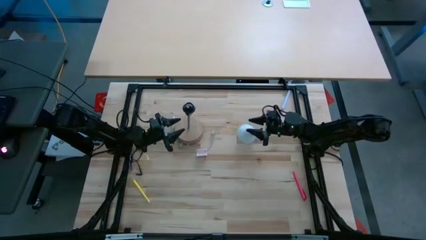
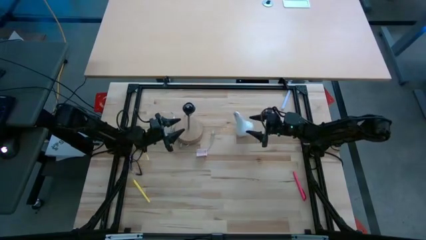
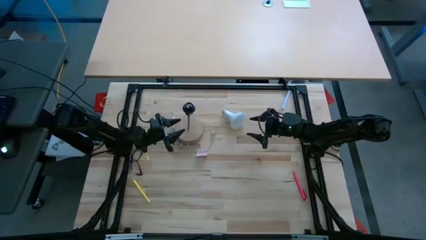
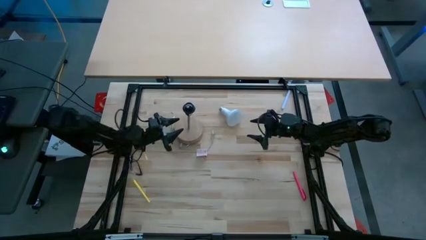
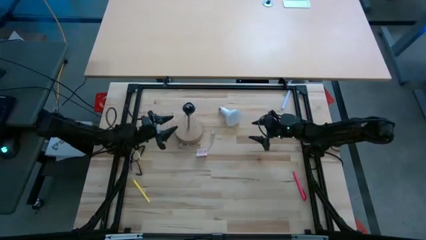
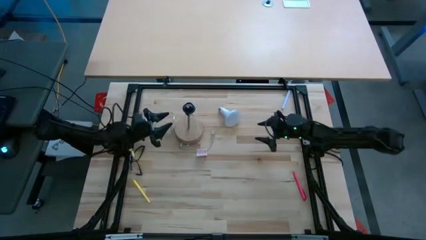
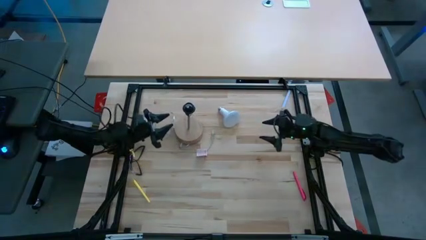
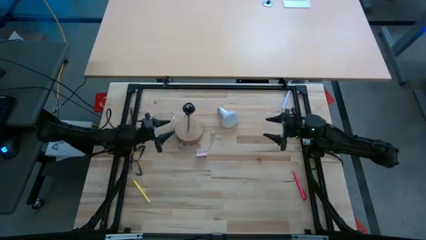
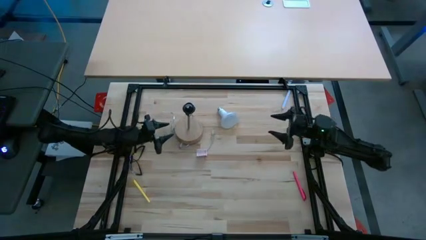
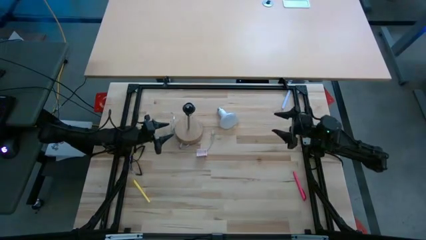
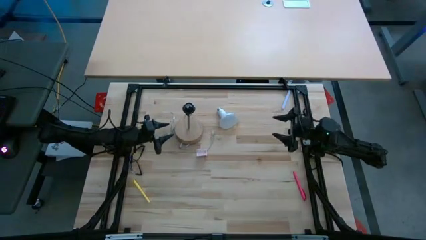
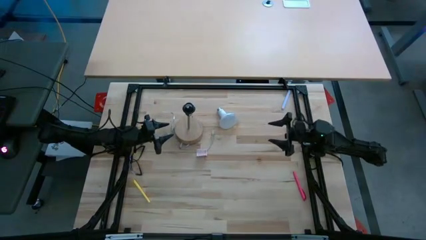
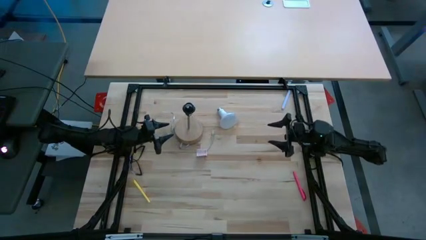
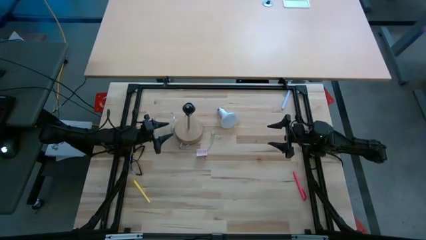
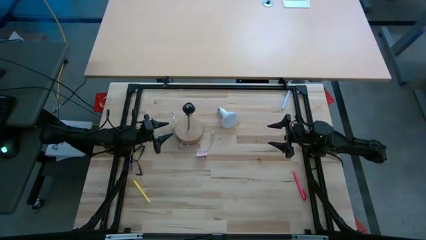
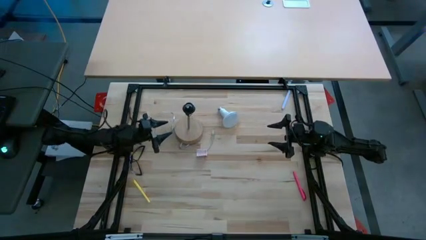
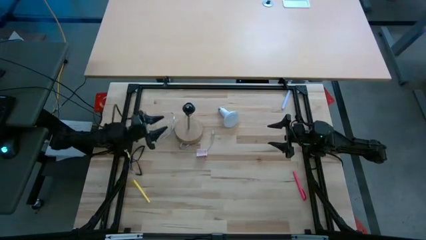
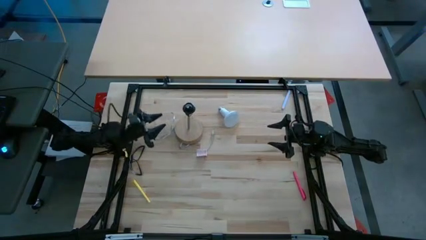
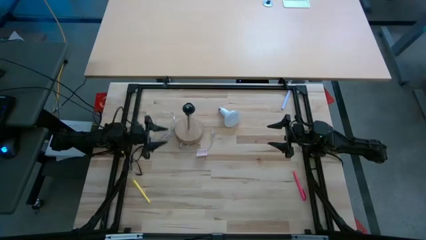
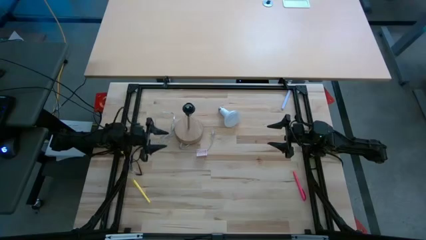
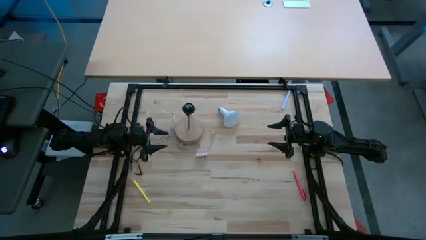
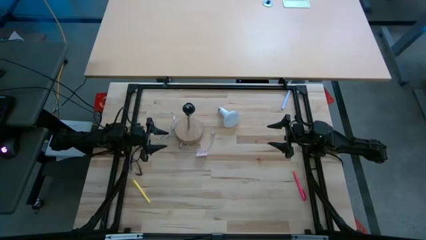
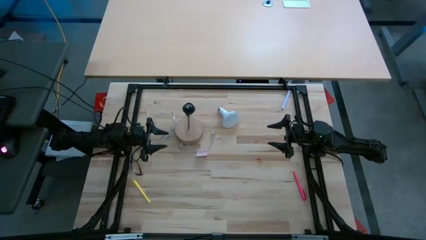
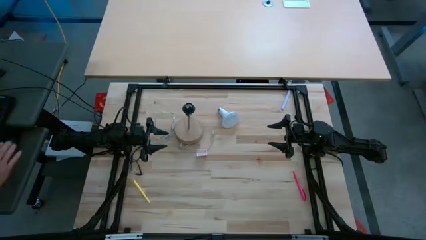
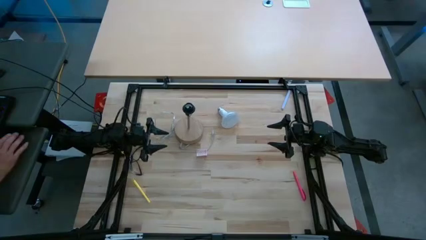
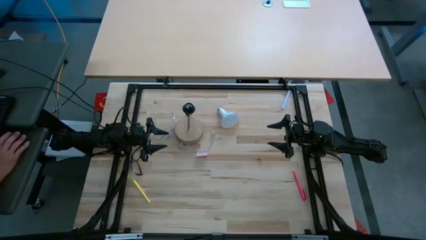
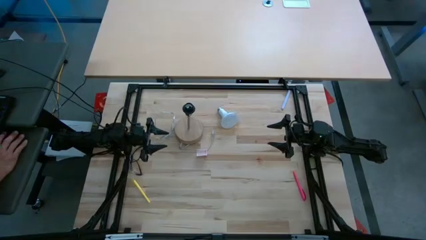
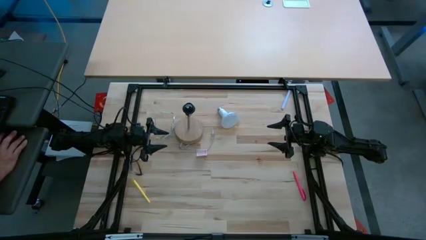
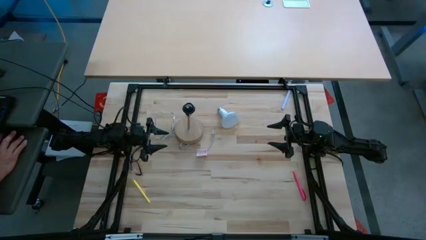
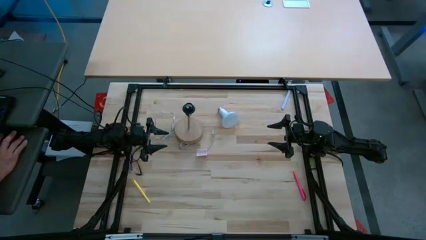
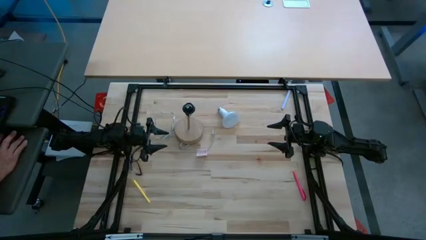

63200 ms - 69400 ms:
Task: Screw lightbulb
Return to Home Position

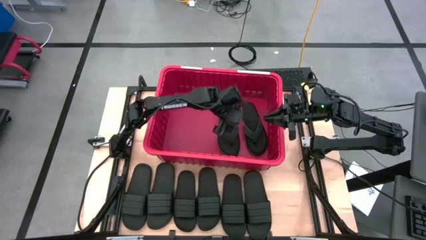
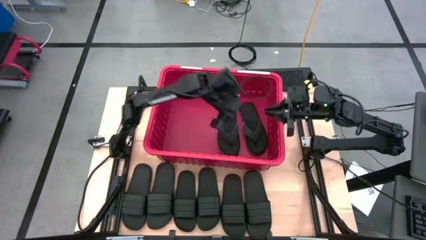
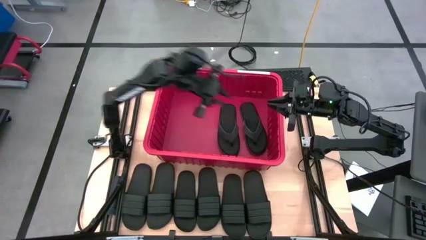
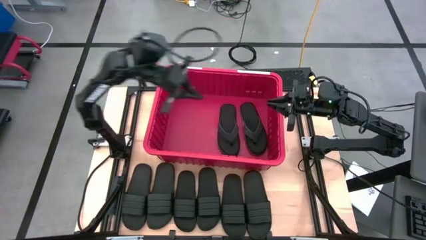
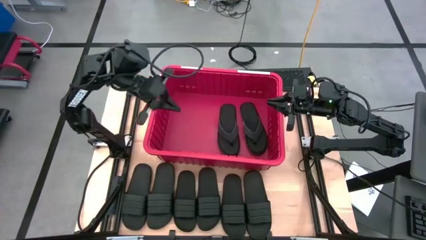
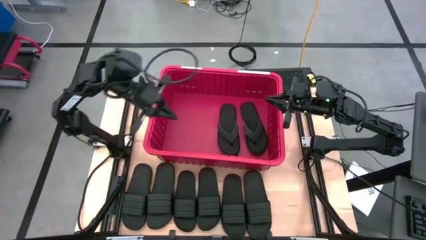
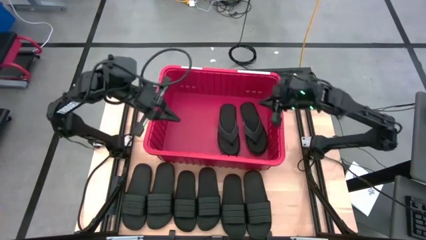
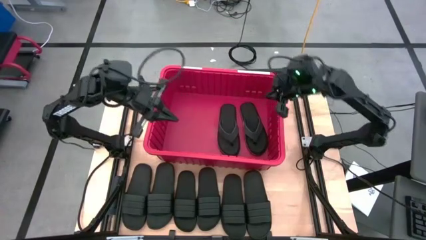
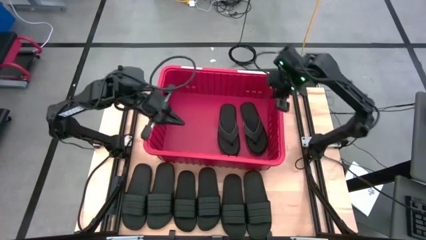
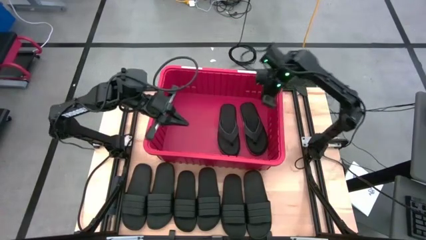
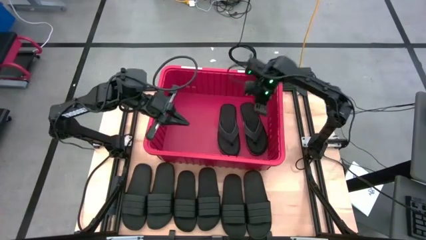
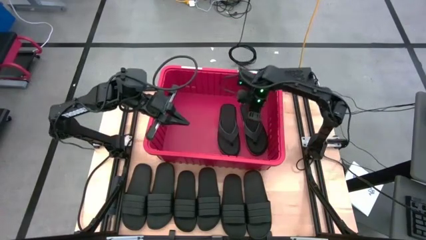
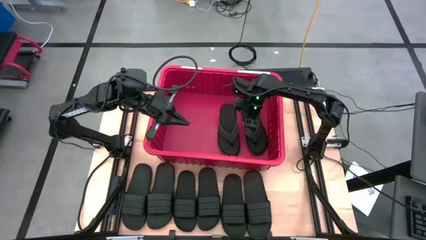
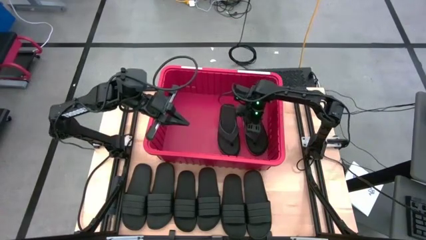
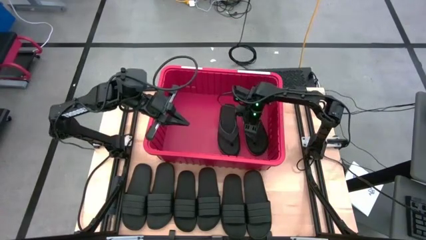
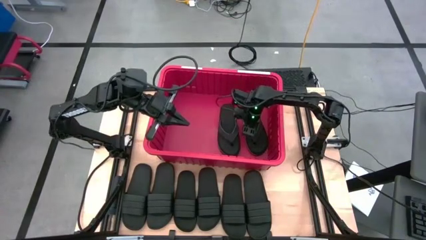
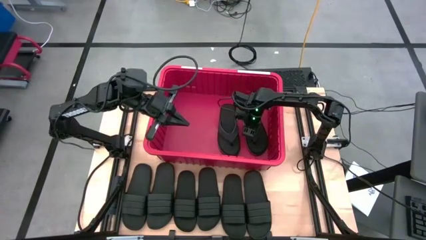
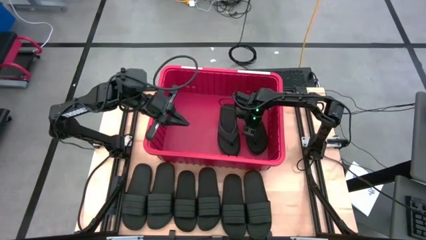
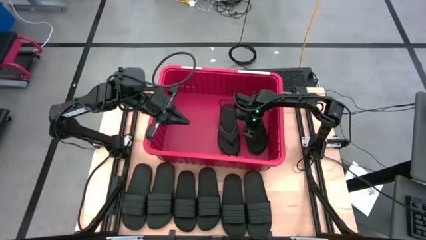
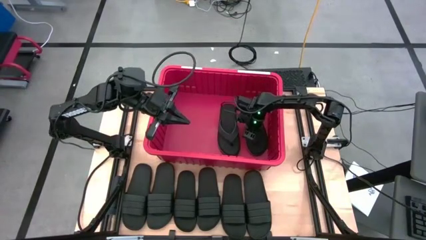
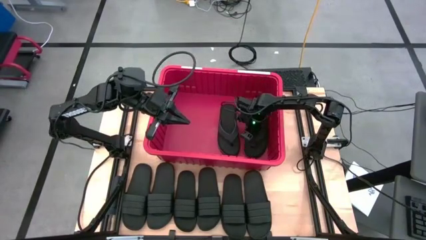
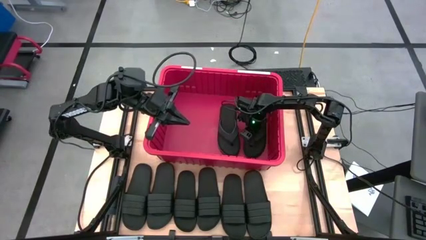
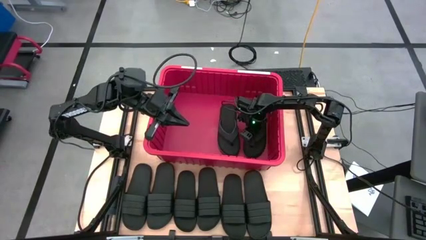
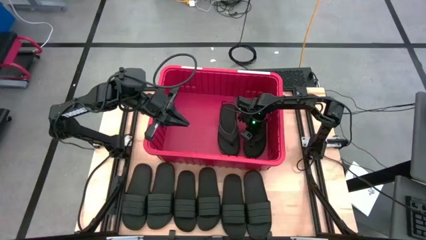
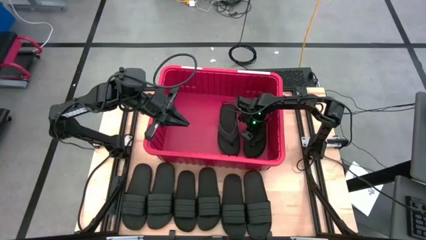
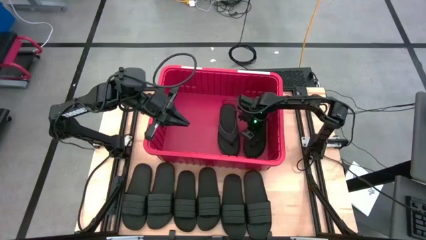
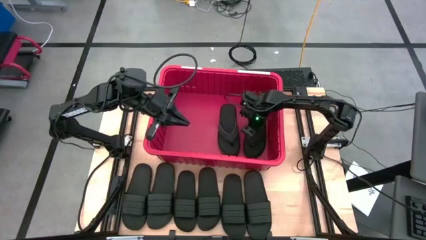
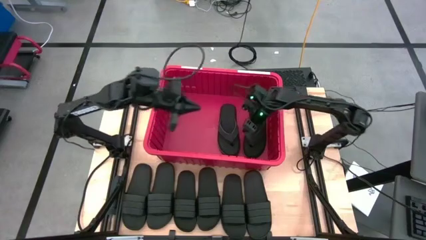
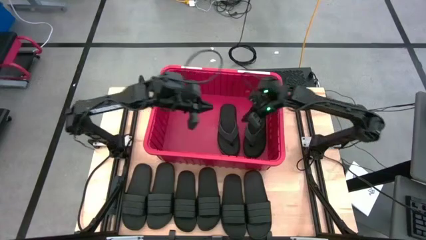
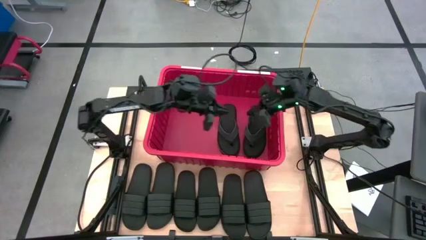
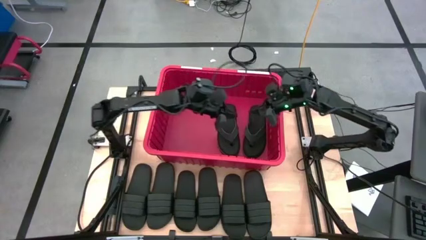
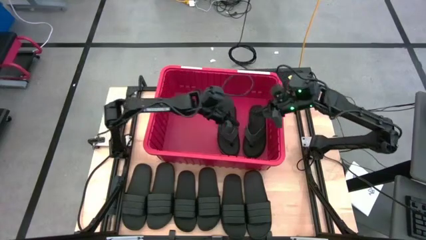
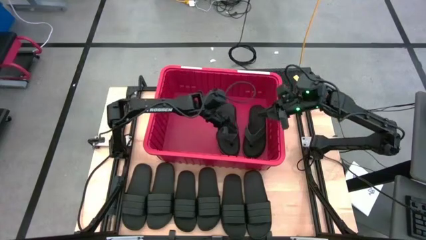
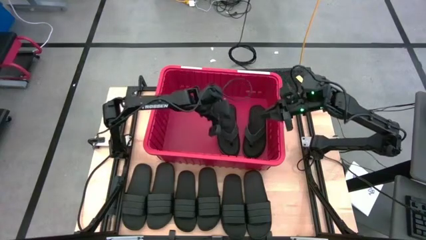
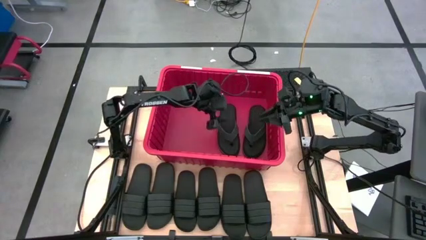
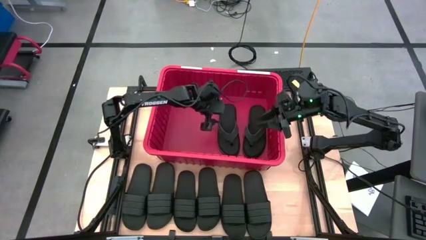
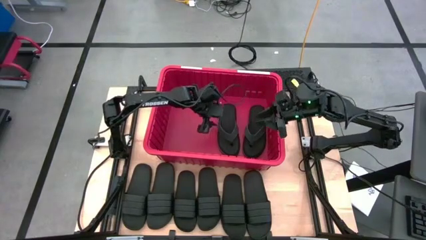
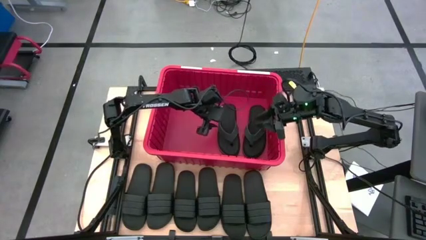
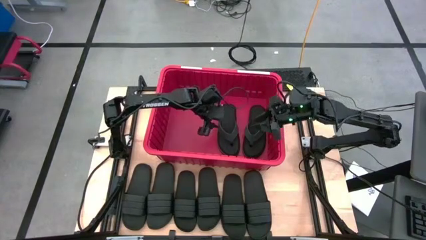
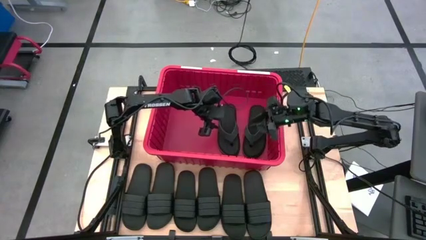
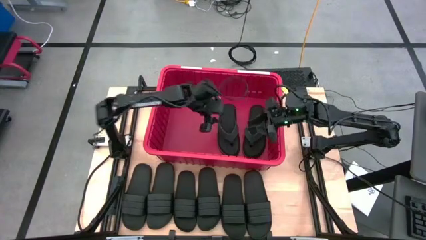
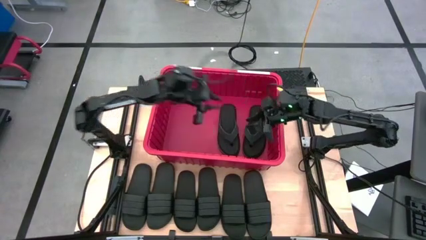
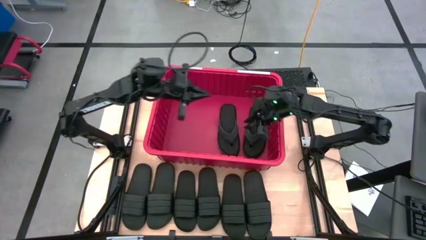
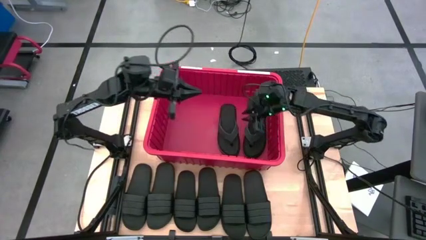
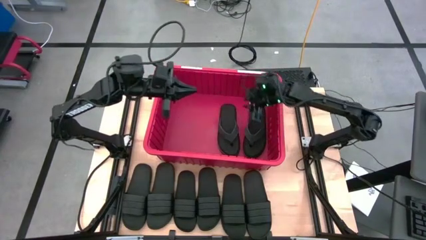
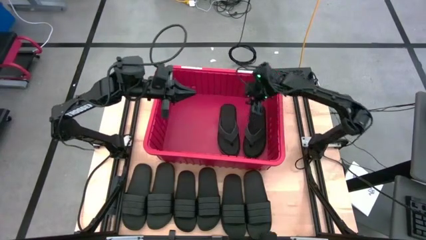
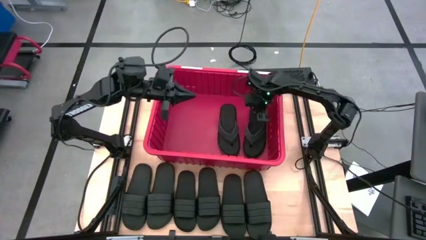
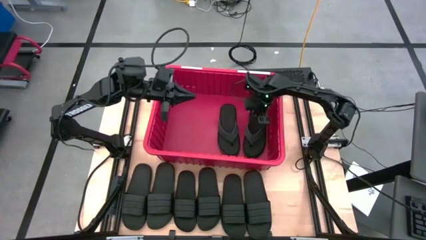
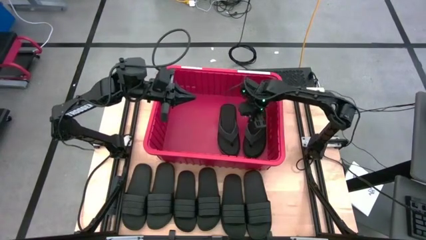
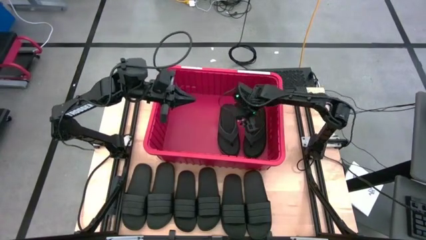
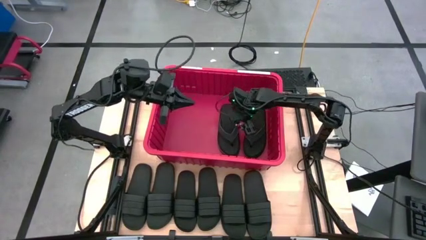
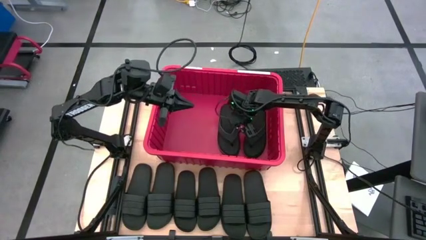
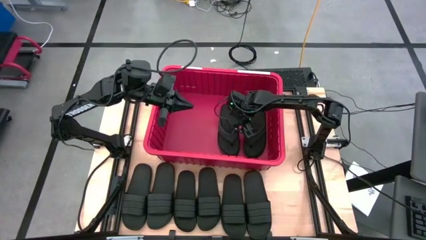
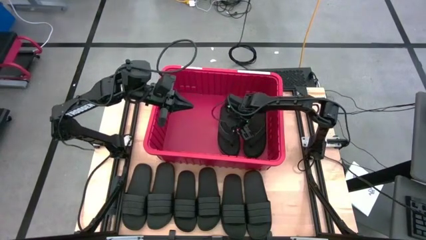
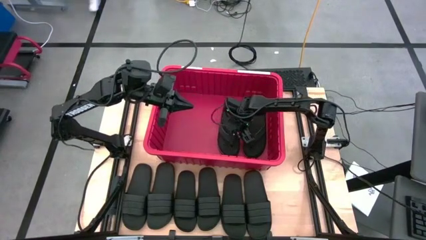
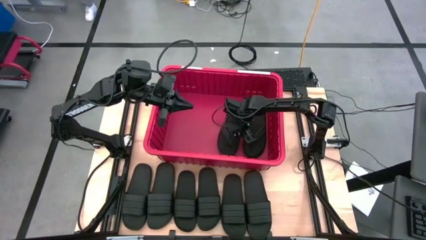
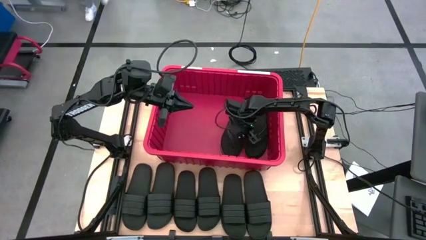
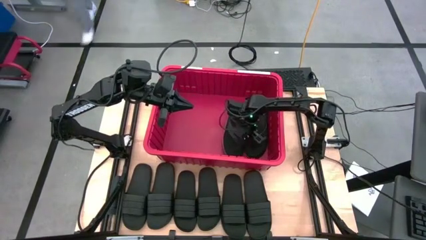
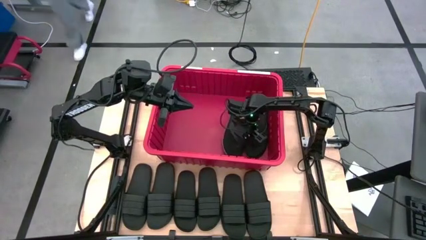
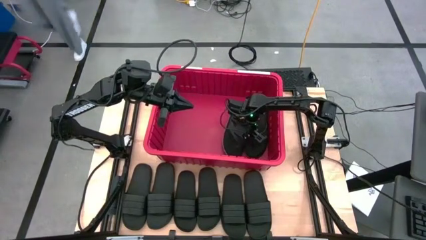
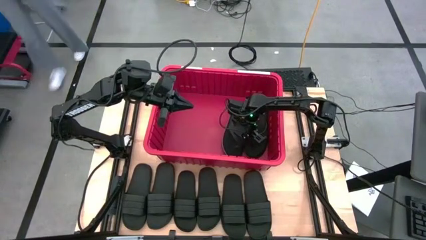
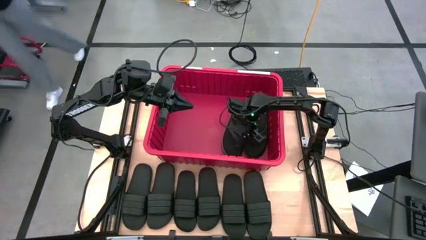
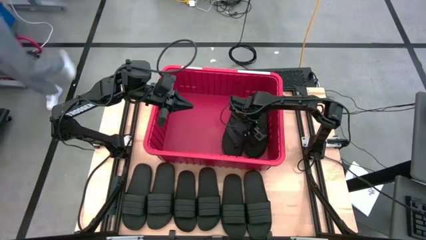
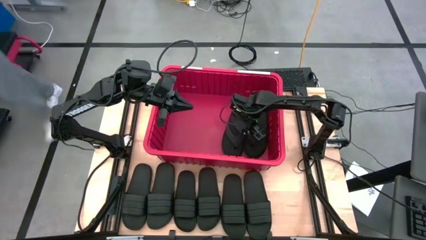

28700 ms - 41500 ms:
Task: Pick and place slides into bin
Adjust the slippers in the red bin
